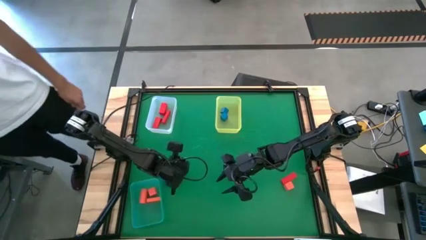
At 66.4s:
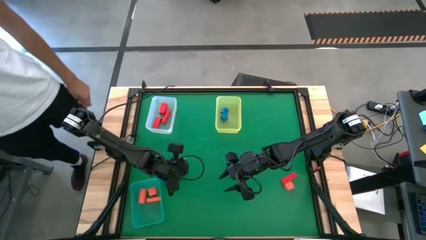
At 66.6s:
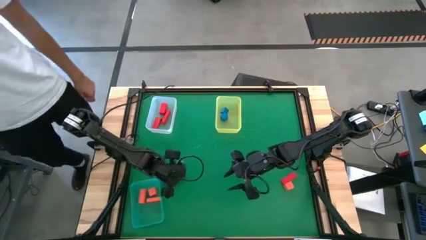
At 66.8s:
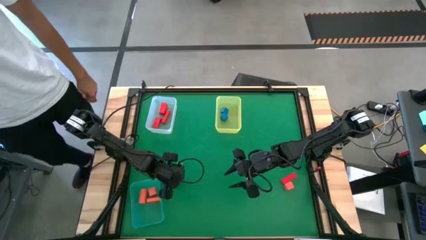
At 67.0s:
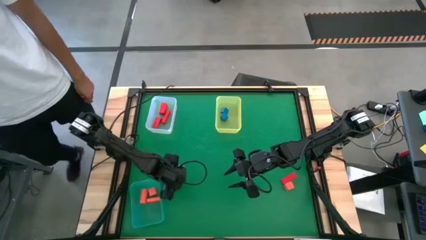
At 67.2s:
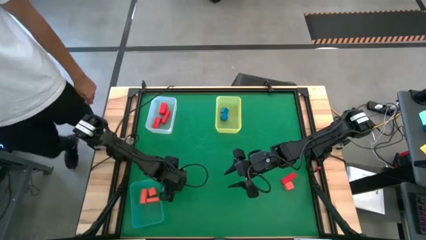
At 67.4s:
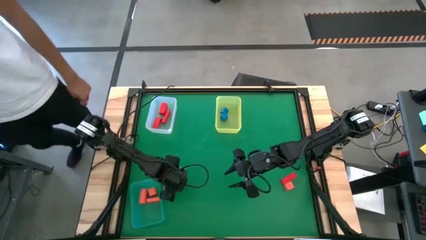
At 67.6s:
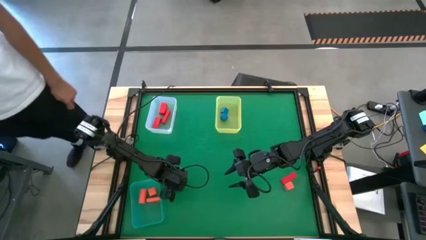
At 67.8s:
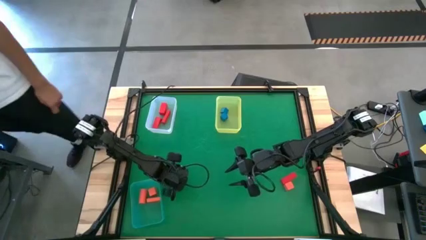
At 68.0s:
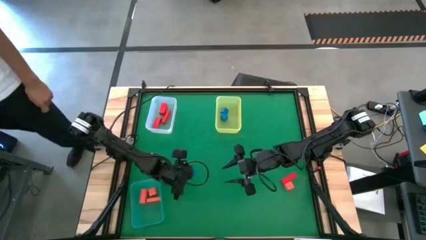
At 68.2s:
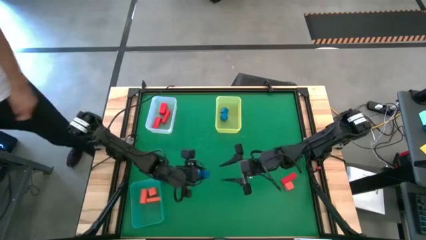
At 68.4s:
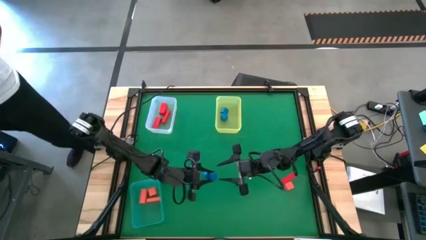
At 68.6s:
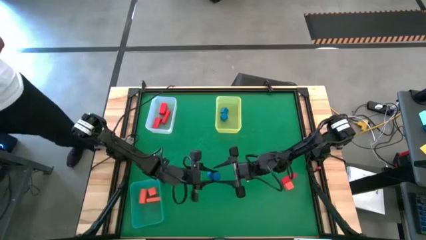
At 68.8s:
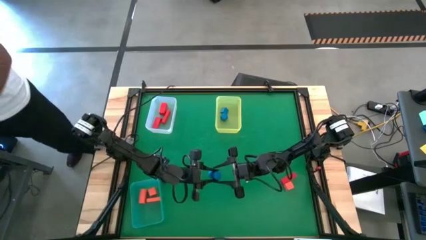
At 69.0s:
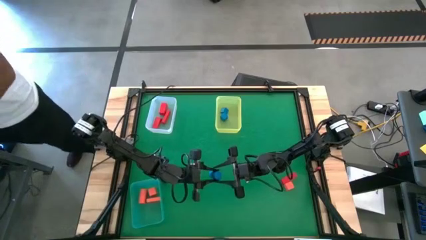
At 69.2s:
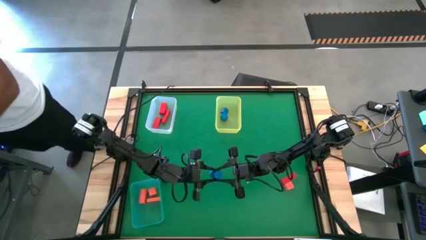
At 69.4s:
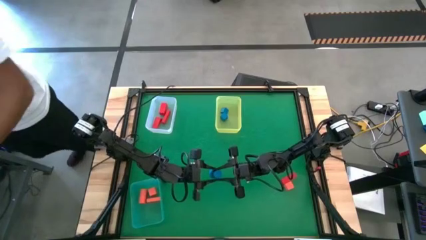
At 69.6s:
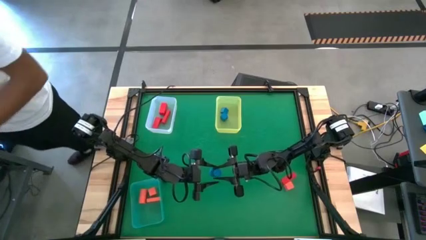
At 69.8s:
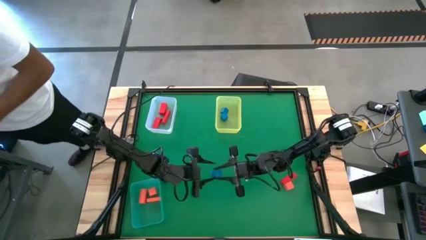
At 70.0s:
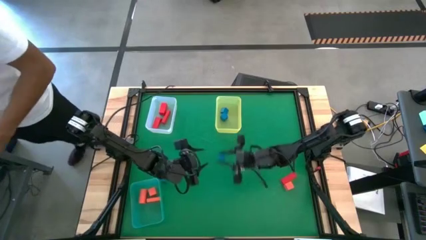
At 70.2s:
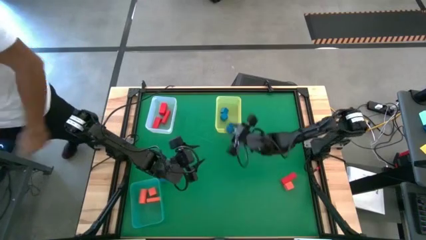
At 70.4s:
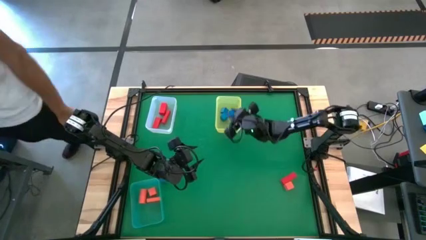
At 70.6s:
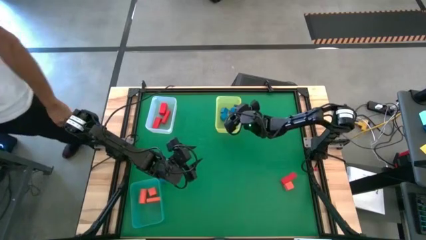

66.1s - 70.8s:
Task: Sort & place blocks by color
Put the blue block into the yellow bin

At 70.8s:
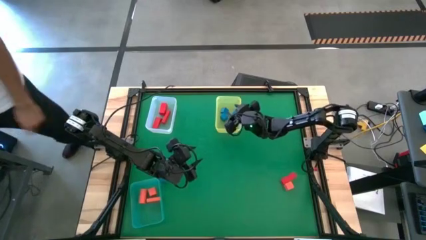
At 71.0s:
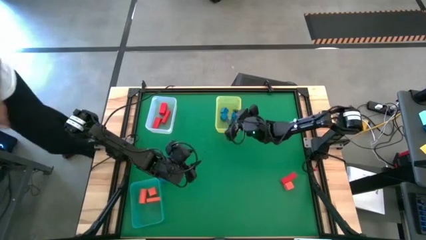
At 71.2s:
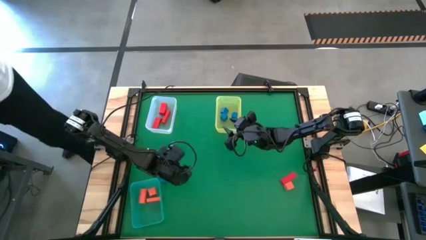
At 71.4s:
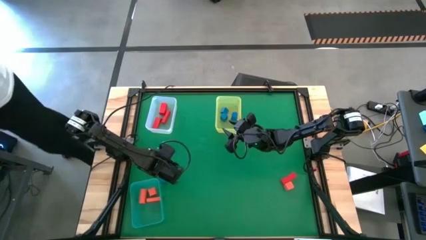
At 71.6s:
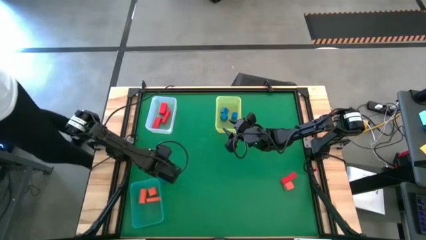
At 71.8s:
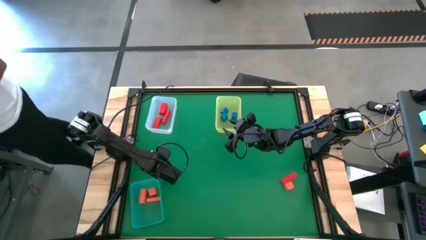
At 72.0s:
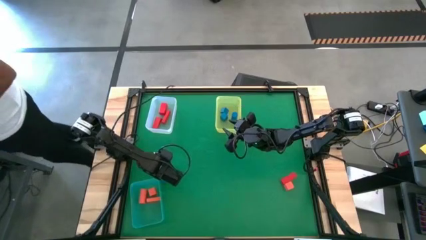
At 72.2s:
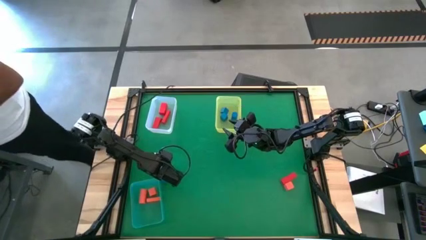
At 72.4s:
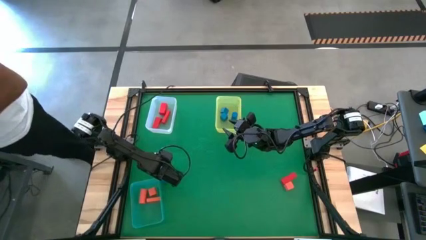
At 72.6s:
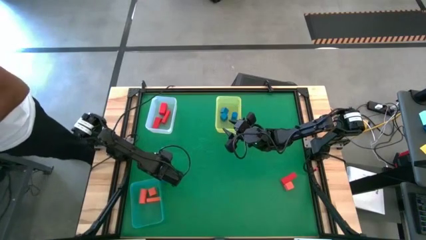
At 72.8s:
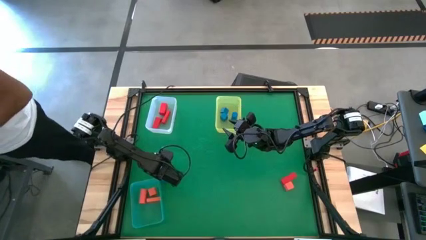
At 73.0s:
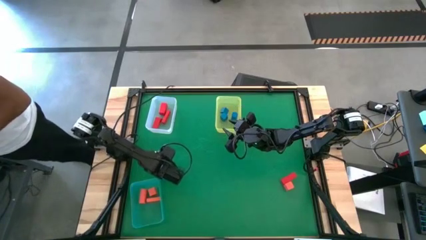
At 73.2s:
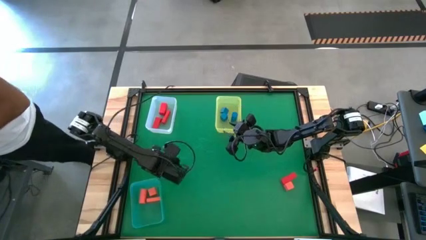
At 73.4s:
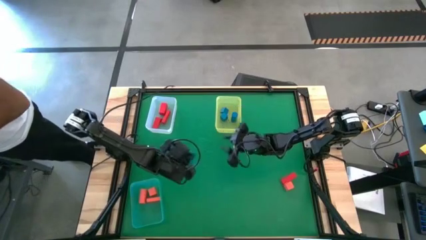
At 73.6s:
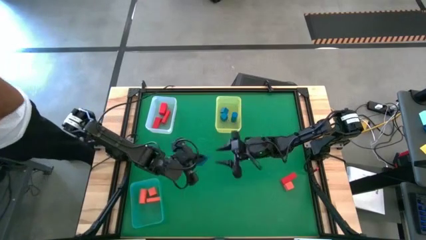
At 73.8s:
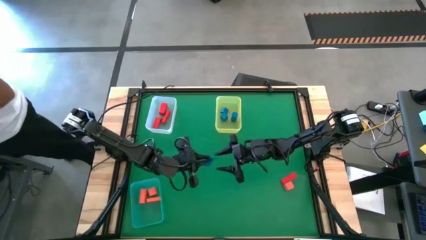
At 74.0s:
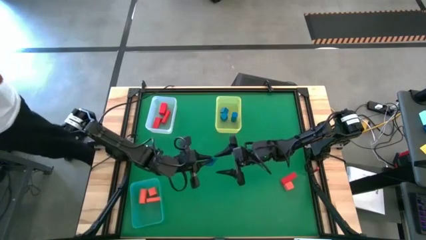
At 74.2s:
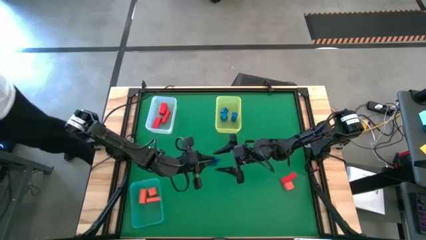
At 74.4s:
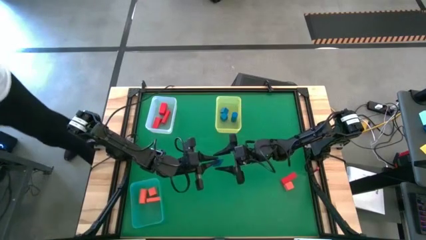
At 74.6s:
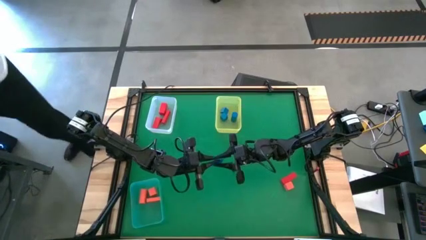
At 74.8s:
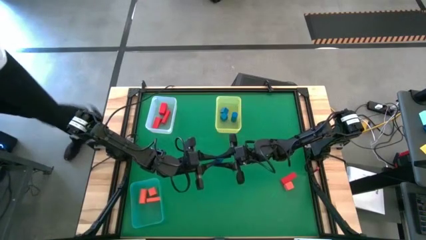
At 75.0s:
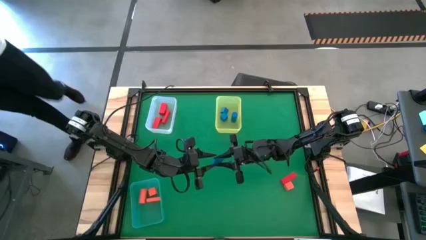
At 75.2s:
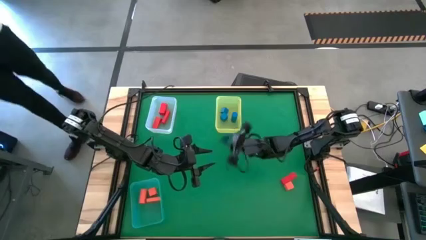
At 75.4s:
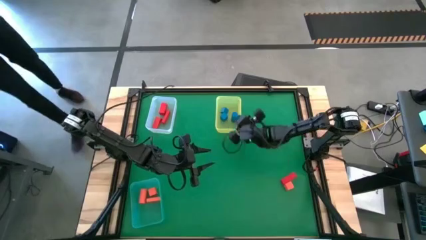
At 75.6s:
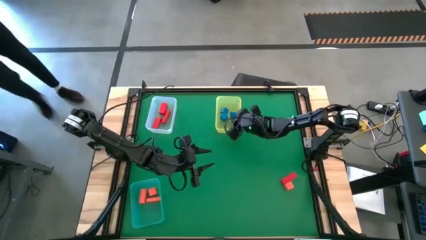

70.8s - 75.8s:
Put the blue block into the yellow bin

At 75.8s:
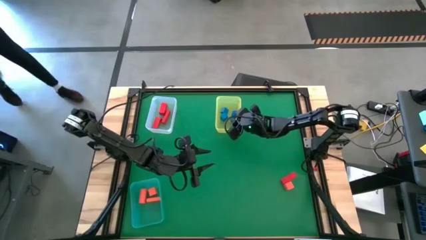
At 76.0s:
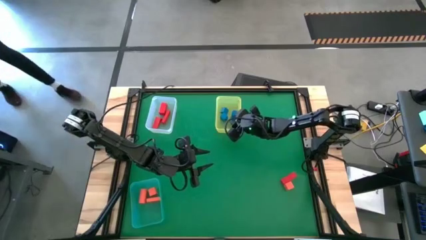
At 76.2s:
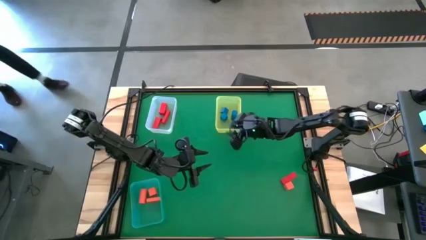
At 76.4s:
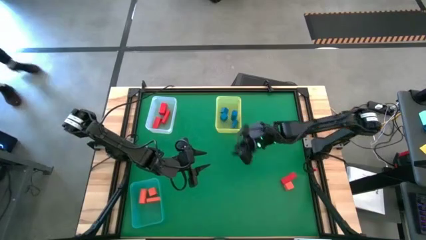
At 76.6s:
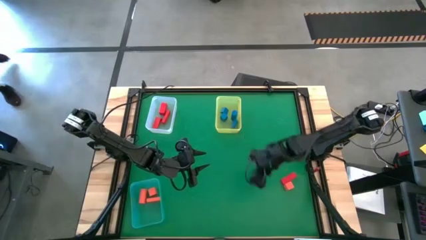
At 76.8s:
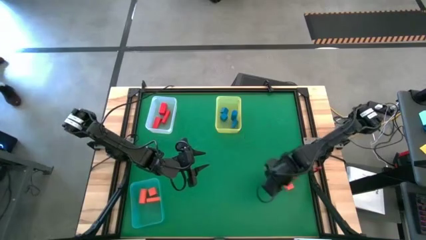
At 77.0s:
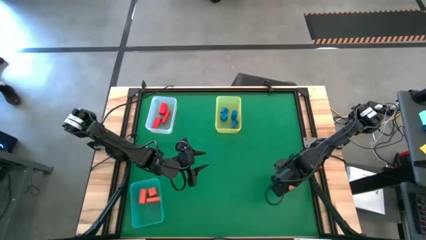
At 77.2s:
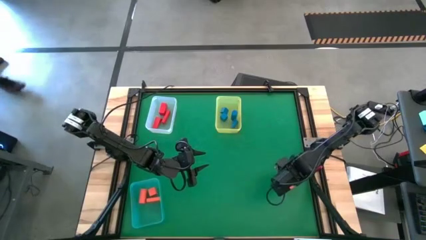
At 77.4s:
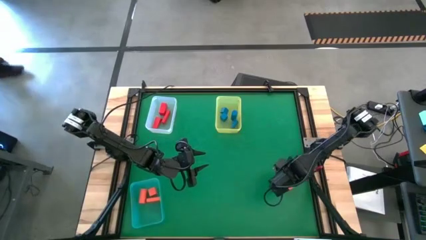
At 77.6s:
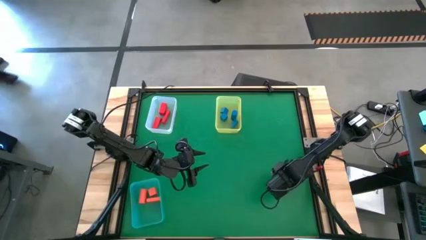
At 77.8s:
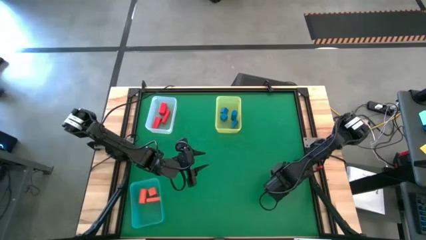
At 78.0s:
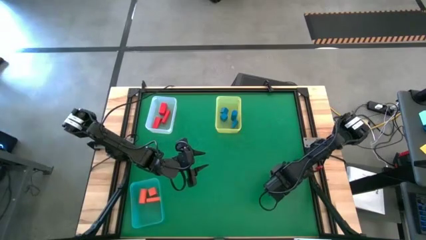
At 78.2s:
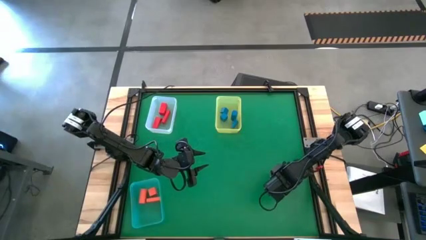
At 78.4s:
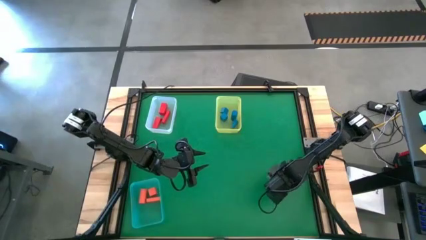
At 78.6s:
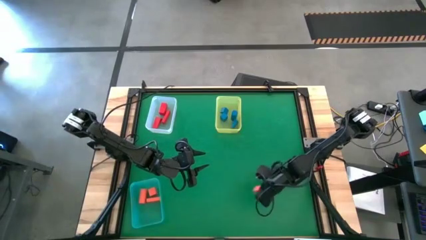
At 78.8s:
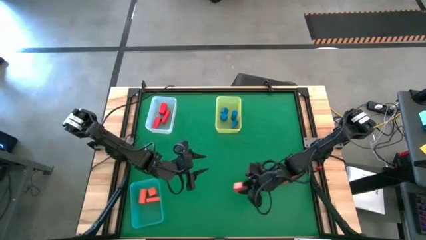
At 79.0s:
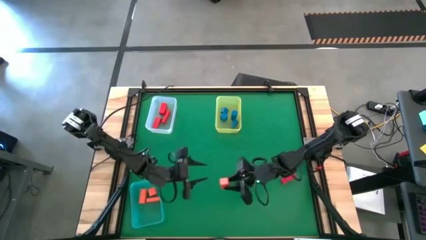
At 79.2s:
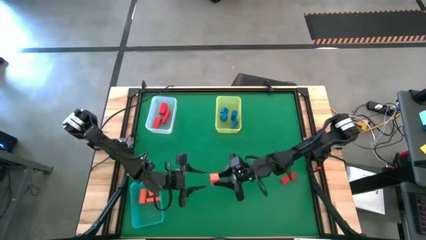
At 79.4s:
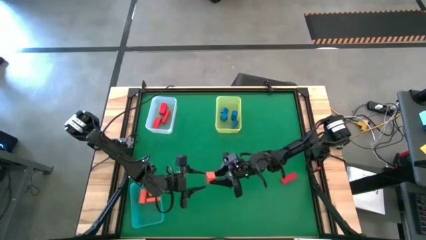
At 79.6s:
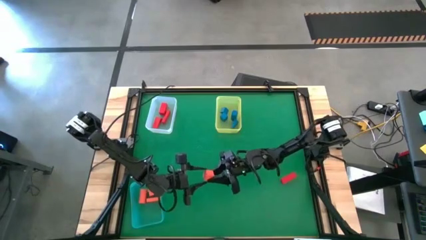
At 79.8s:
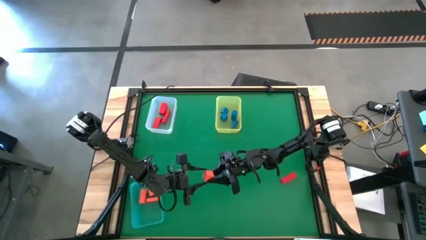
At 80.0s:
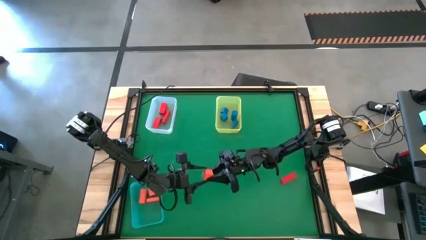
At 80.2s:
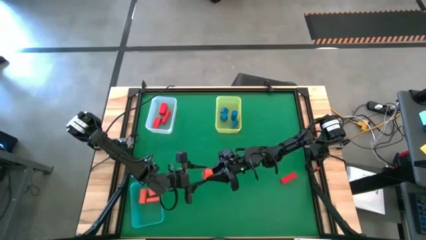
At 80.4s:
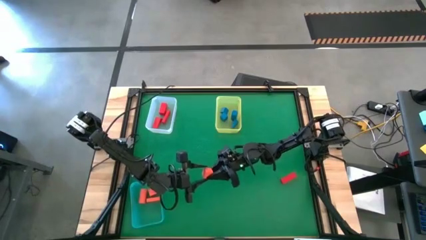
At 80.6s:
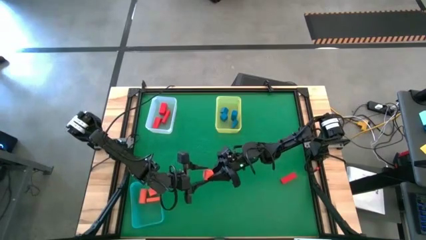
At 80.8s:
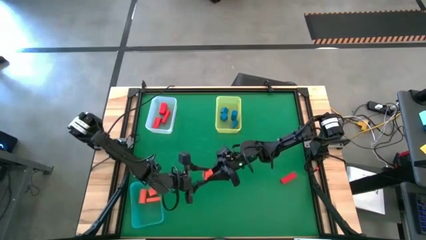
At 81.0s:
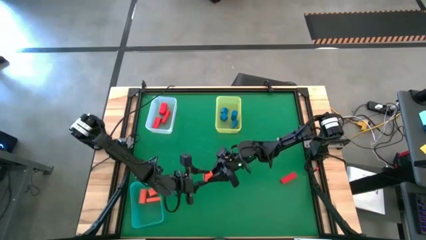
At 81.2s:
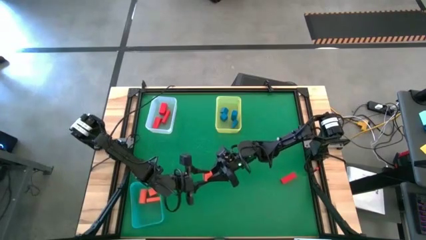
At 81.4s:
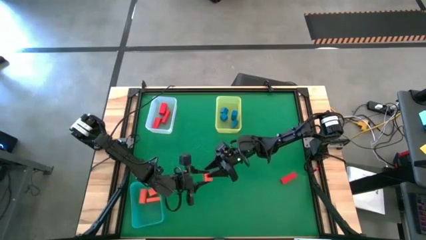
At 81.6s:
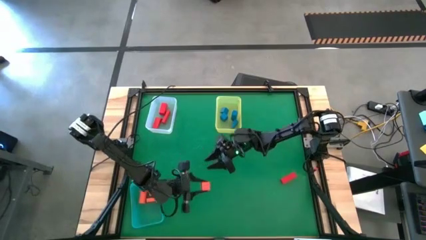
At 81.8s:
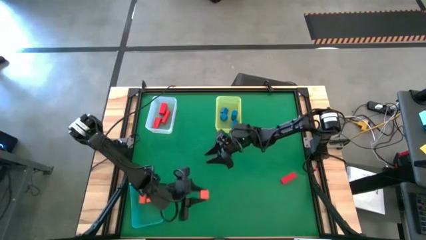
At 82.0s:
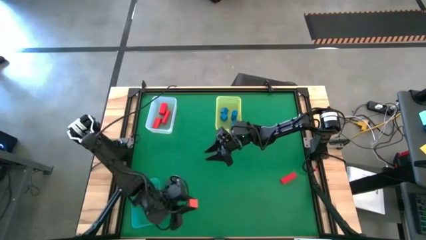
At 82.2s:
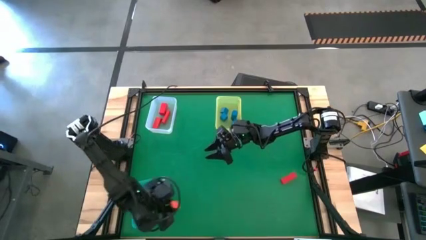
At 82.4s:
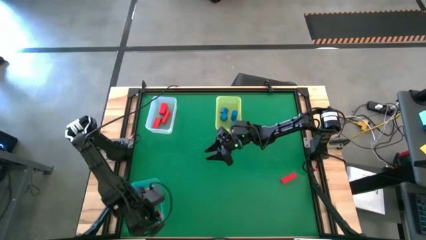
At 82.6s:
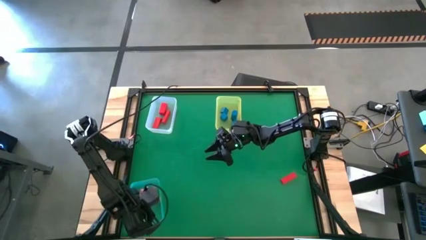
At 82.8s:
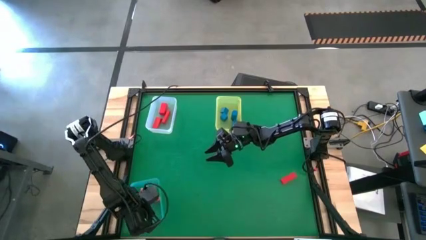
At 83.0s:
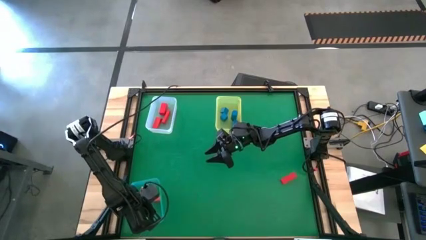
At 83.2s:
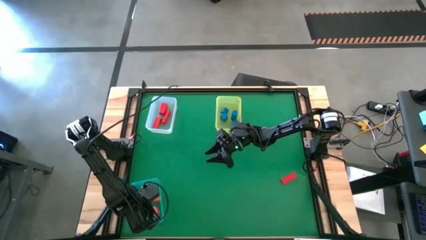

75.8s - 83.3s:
Put the orange block into the blue bin
